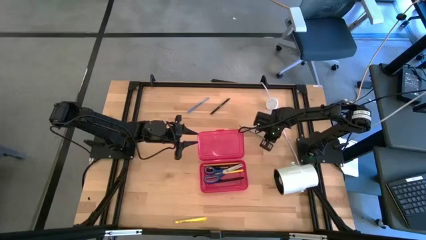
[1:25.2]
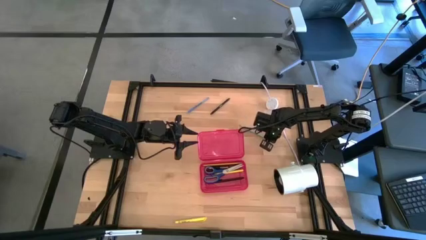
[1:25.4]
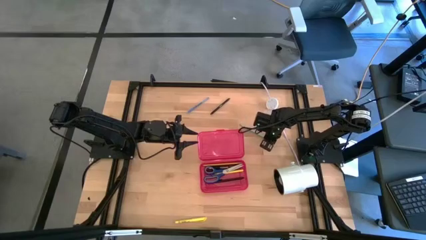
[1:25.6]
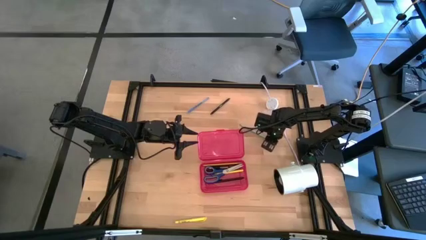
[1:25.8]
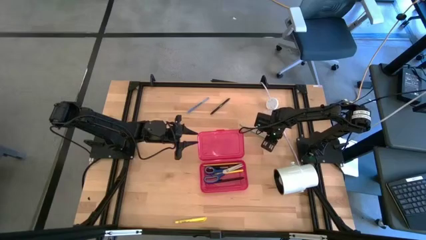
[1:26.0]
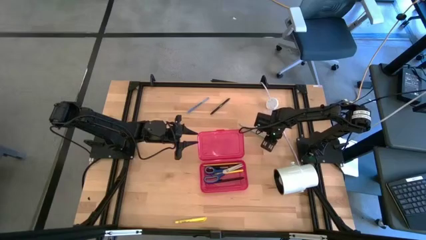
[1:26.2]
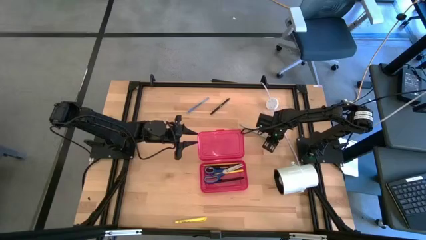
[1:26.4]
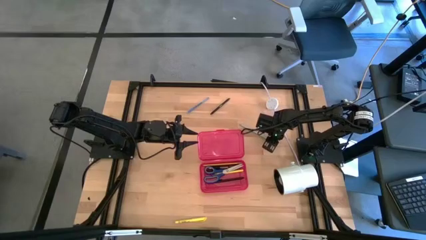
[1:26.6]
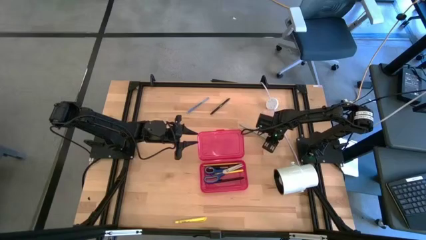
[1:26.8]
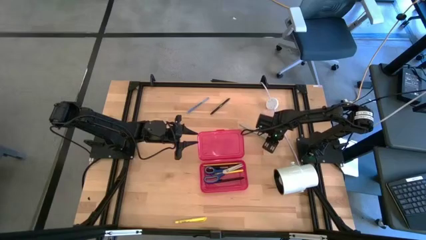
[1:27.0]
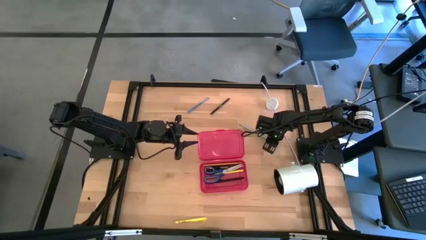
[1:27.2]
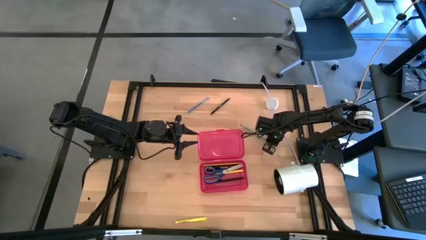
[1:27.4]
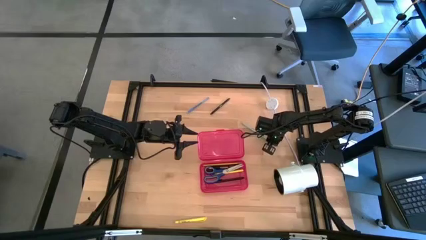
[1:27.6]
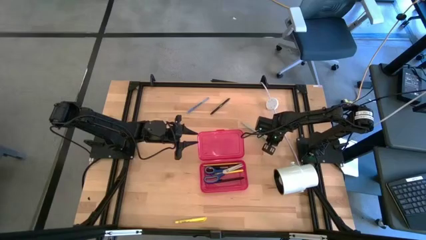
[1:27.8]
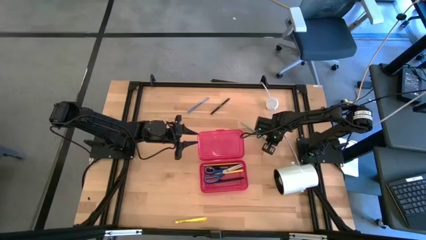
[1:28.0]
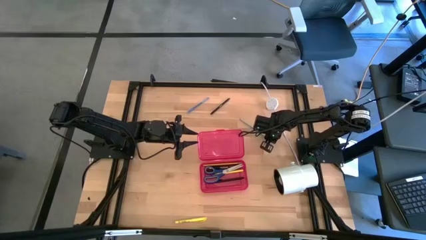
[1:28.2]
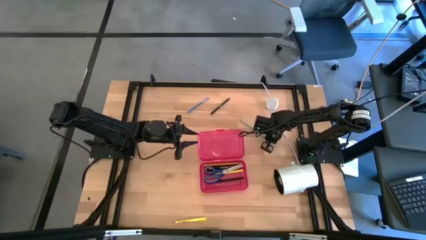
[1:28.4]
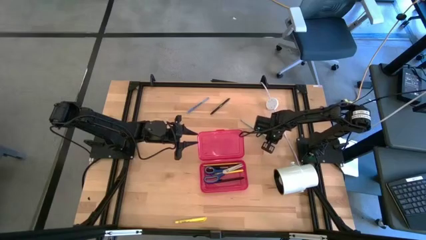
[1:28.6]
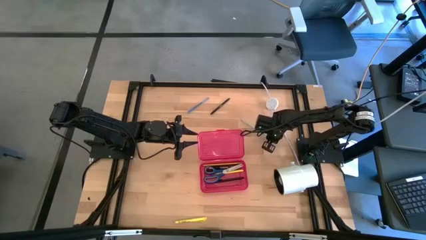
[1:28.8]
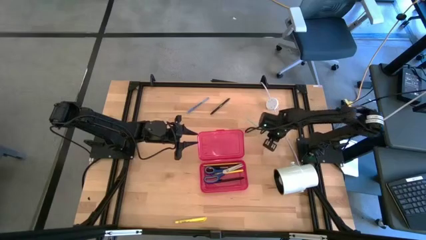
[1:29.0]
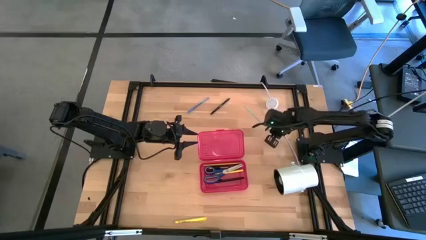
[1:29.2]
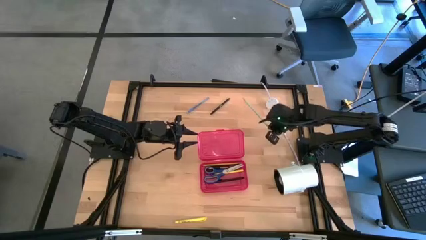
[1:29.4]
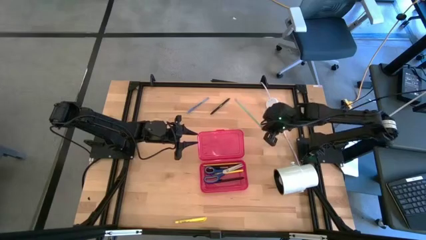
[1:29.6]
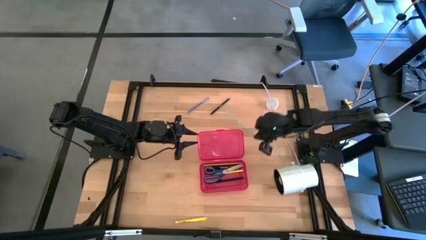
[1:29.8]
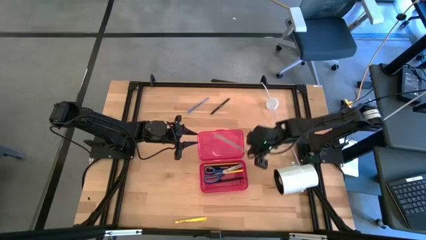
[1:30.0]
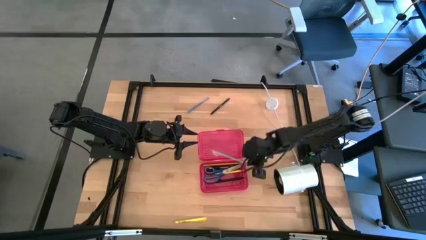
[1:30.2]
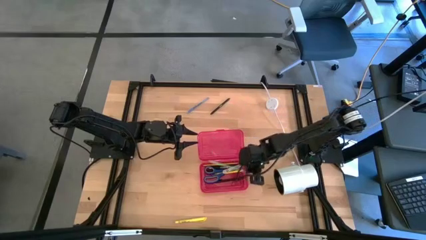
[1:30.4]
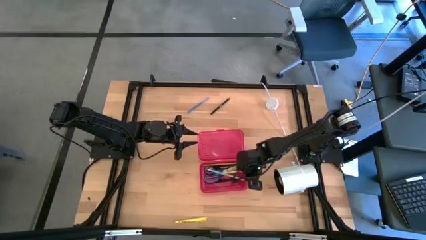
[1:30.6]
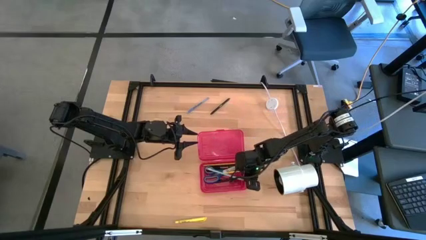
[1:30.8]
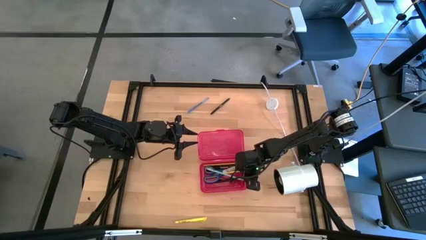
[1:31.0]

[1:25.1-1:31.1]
Task: Pick & place school supplies into a supply box
Put the light blue pencil into the red supply box

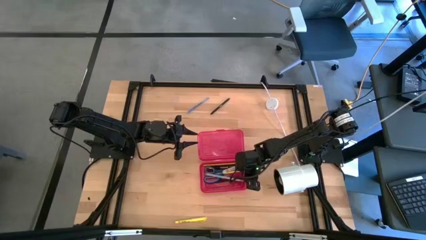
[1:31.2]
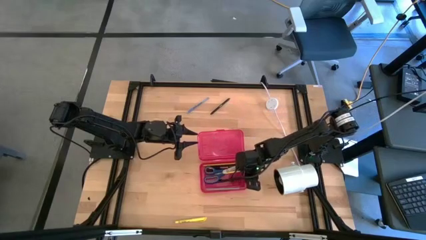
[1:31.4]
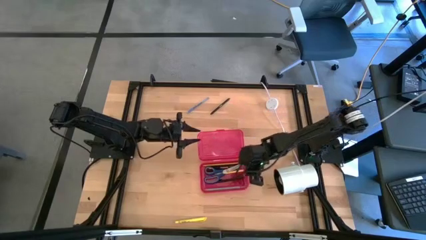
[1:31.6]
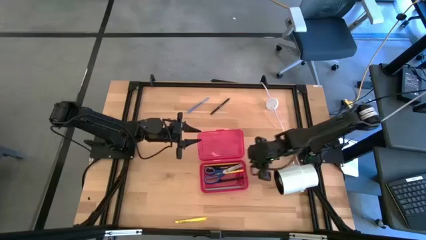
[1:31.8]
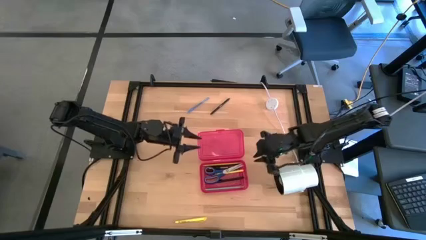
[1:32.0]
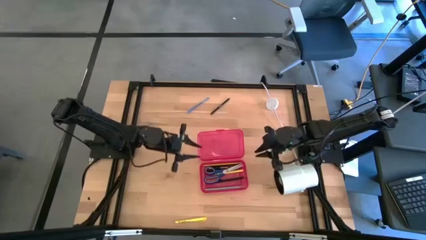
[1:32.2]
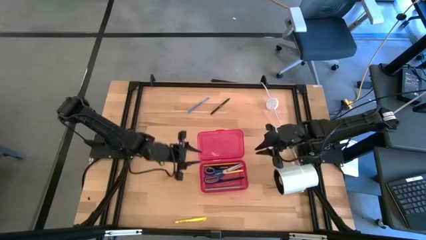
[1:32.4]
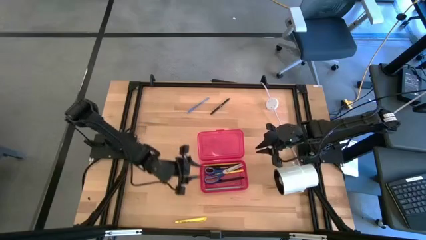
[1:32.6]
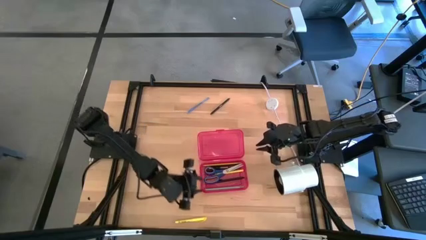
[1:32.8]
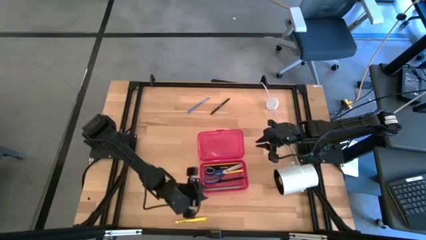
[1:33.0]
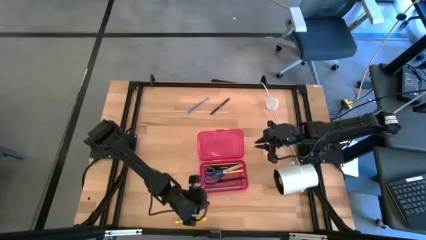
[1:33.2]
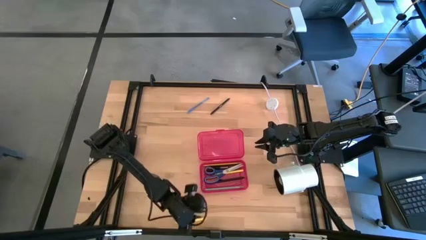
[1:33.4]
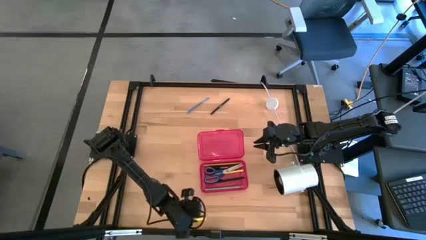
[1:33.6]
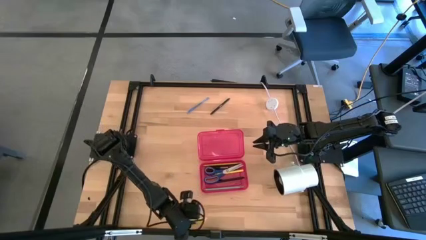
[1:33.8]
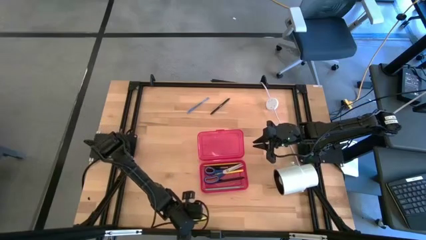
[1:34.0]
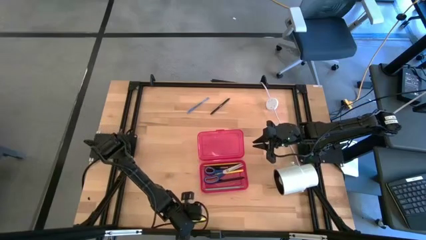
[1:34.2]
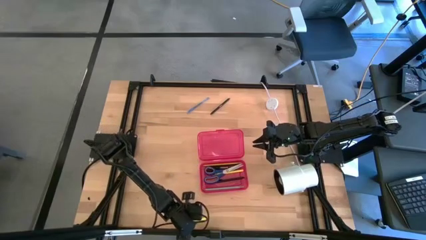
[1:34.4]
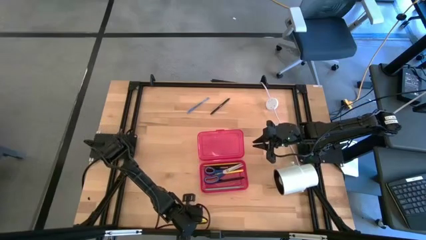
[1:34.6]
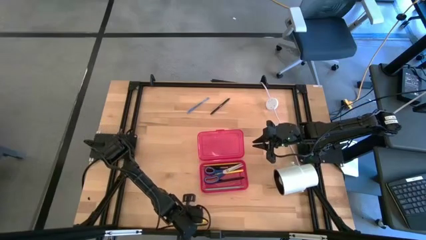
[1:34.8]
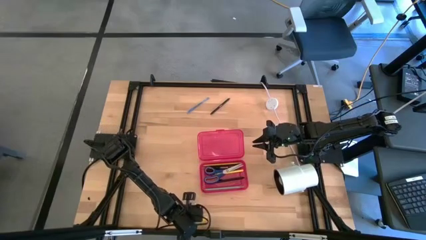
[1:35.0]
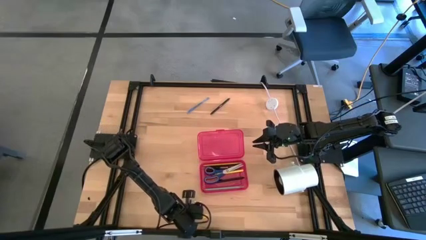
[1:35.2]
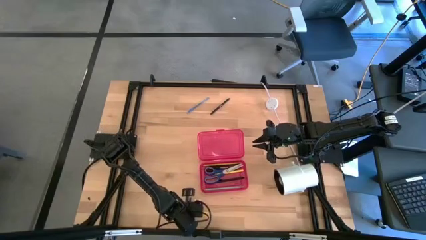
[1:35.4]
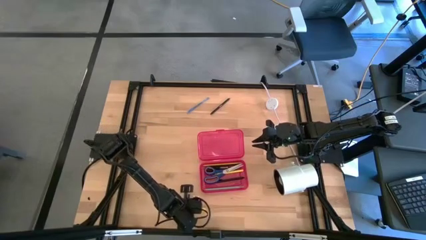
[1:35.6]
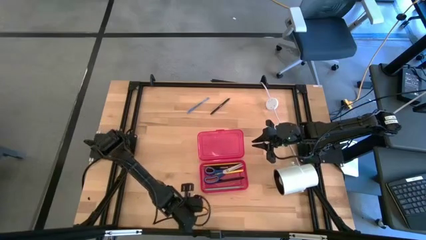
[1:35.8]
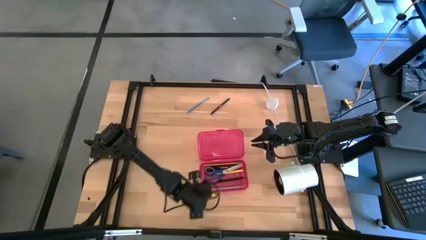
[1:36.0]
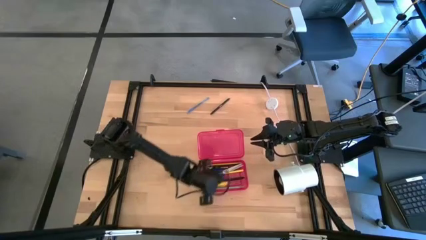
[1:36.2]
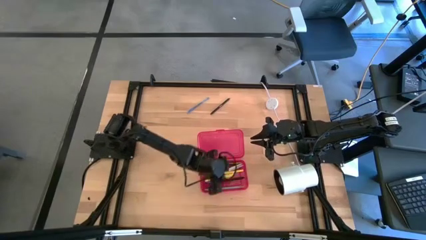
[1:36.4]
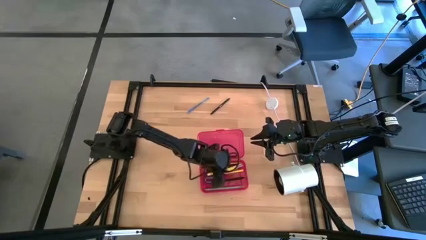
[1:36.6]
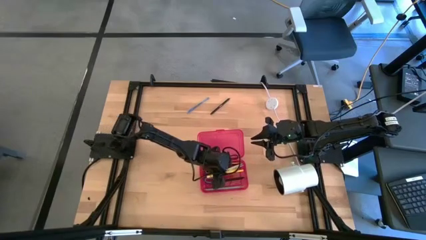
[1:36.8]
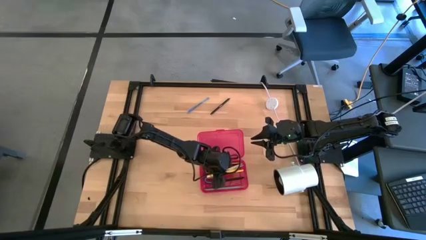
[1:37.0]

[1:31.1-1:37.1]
Put the yellow pen into the red supply box

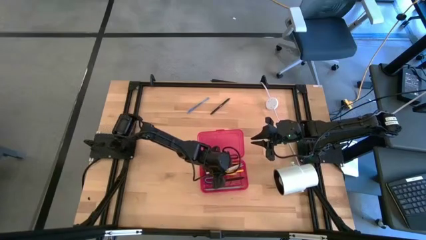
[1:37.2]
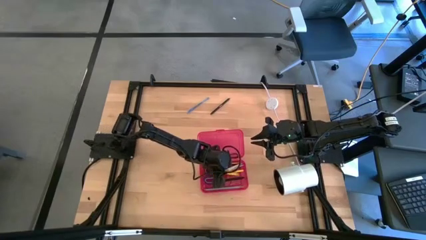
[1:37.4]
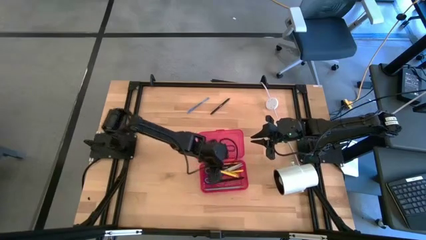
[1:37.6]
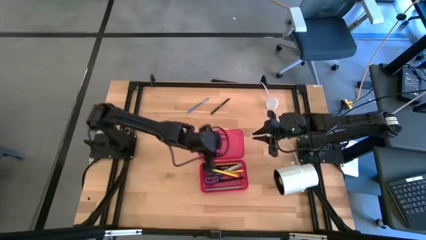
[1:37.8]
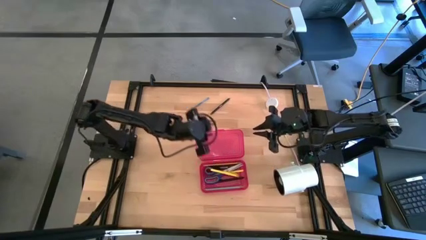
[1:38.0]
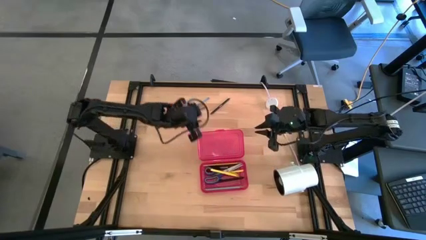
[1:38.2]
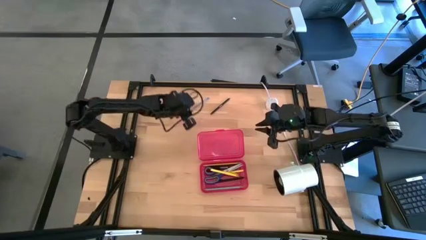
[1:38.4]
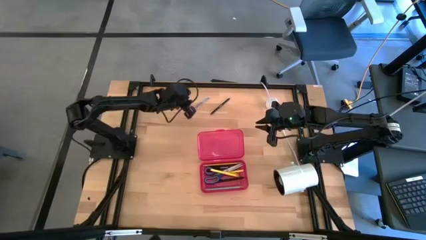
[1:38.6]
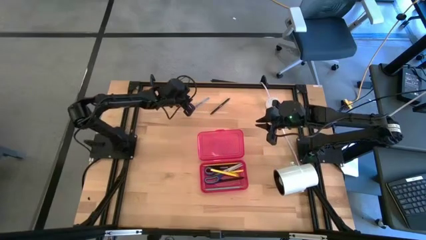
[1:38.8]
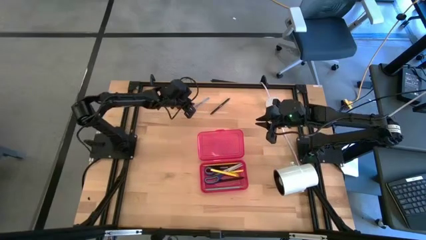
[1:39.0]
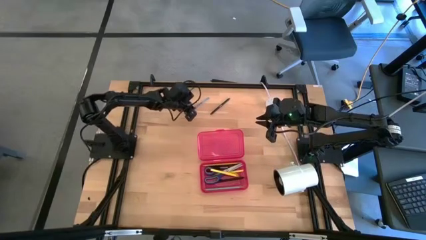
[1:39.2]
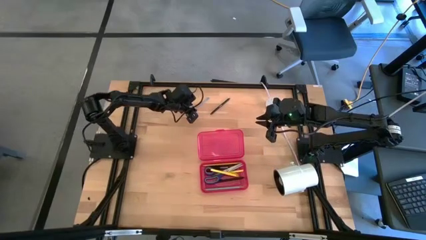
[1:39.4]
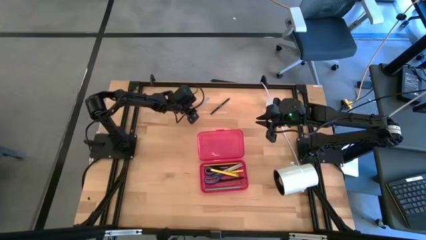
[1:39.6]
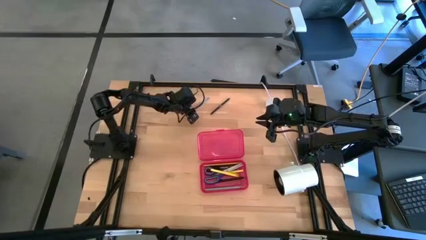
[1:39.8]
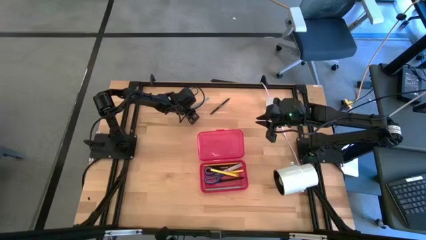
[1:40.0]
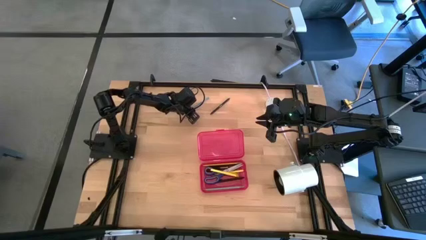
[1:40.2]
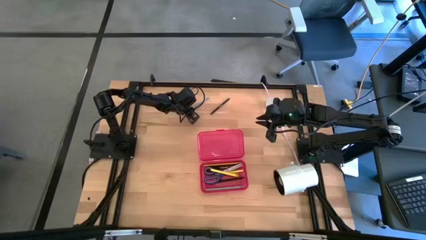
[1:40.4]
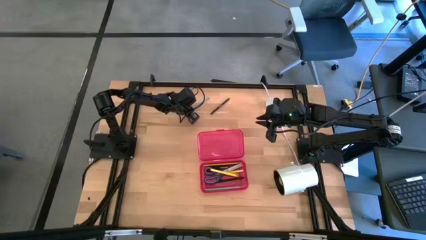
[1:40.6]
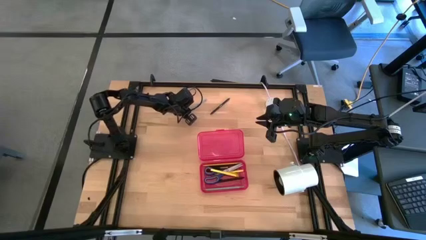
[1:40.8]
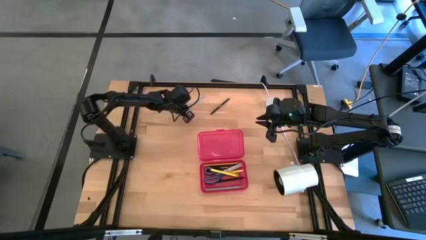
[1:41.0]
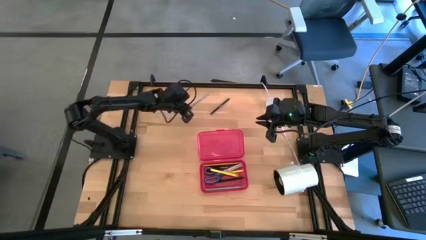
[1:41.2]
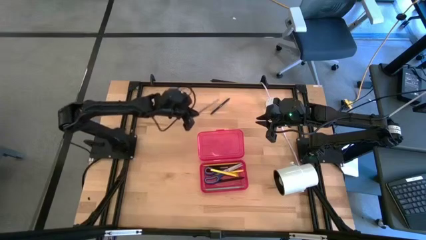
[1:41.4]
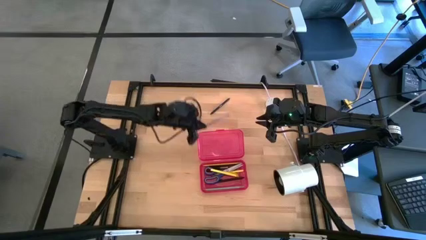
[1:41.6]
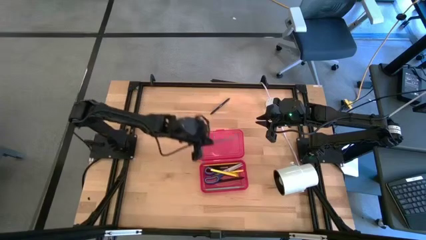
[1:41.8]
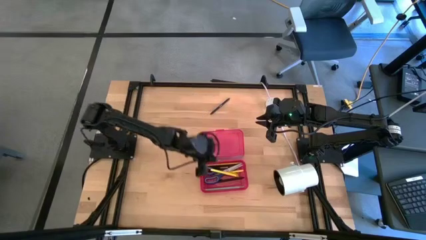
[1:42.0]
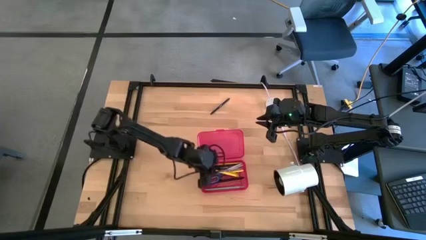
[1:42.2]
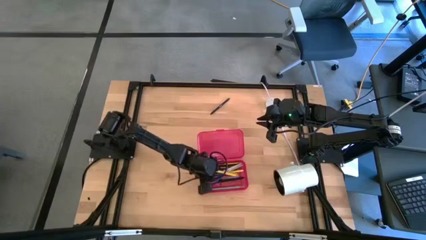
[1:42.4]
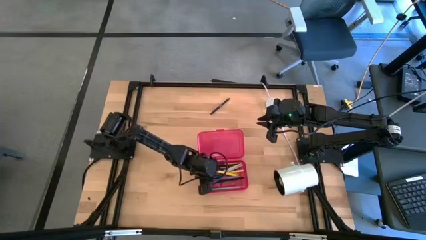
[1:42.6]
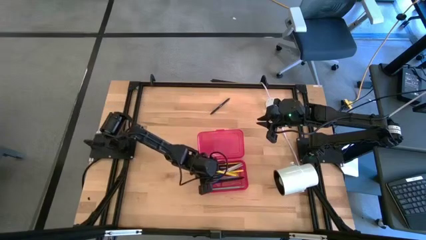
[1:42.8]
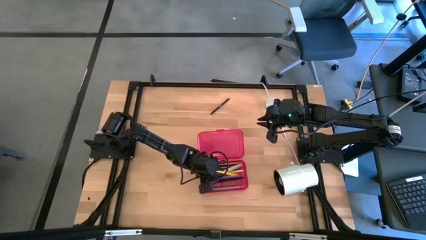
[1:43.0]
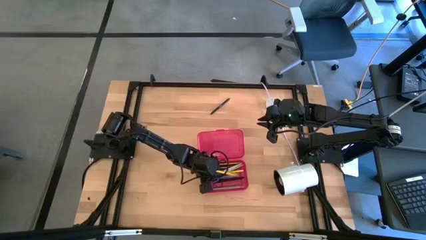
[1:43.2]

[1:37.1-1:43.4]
Put the blue pen into the red supply box
